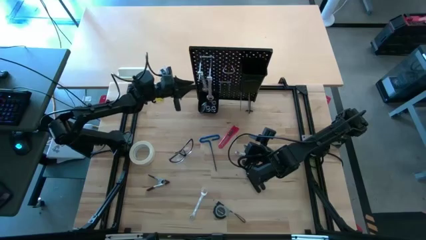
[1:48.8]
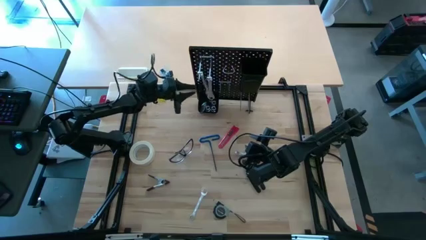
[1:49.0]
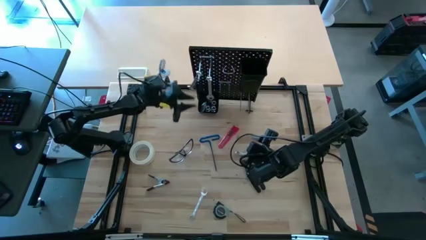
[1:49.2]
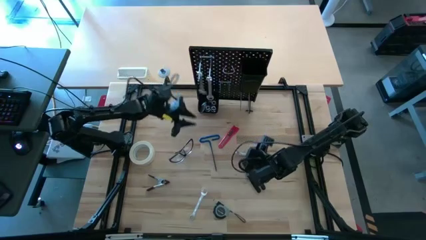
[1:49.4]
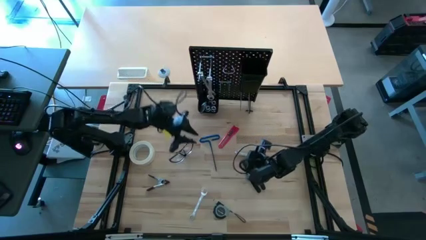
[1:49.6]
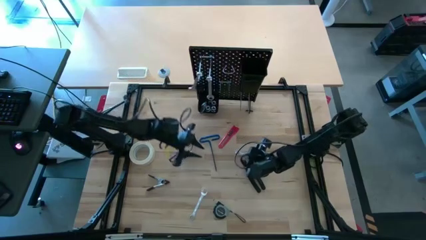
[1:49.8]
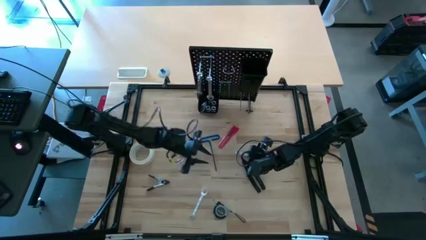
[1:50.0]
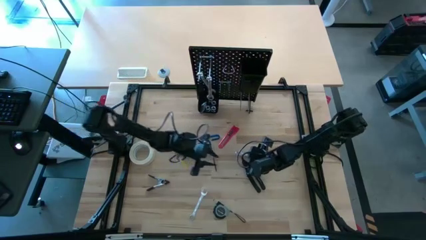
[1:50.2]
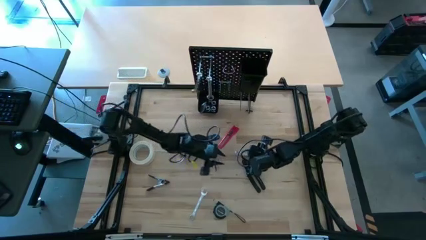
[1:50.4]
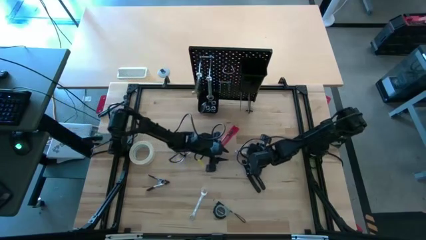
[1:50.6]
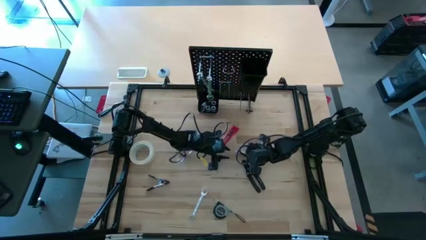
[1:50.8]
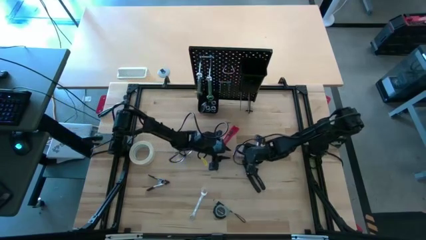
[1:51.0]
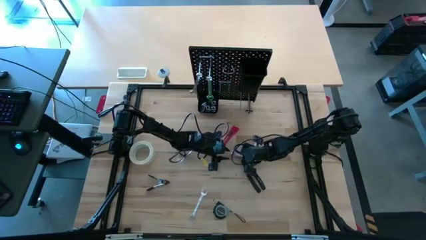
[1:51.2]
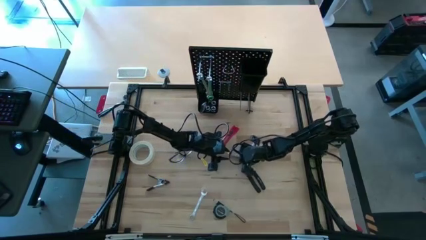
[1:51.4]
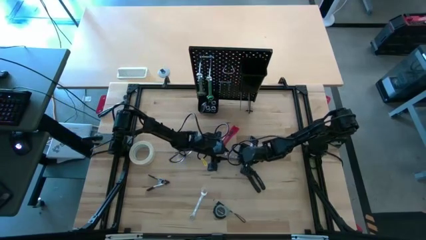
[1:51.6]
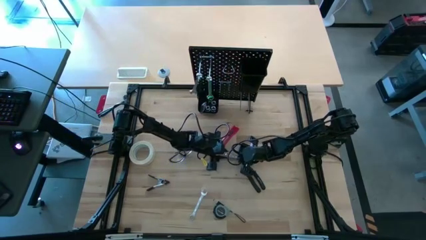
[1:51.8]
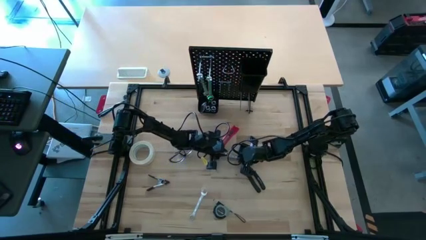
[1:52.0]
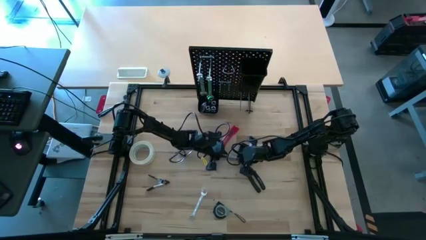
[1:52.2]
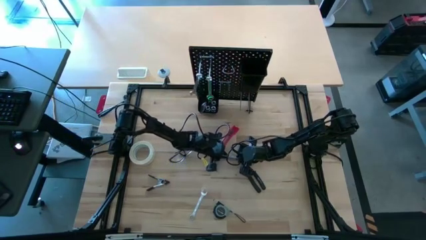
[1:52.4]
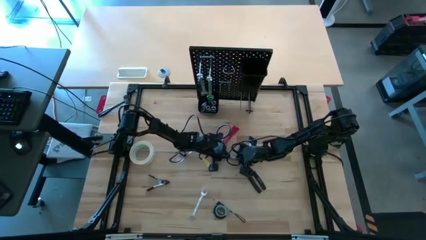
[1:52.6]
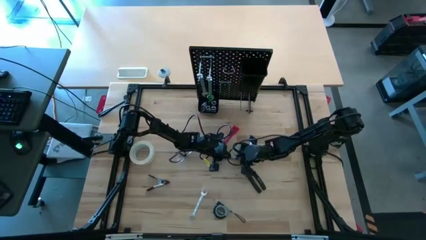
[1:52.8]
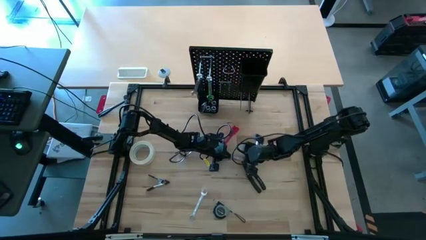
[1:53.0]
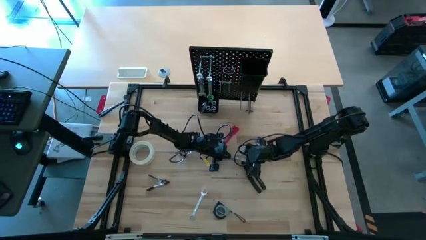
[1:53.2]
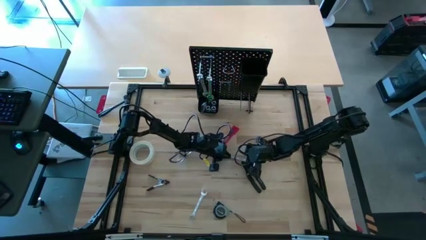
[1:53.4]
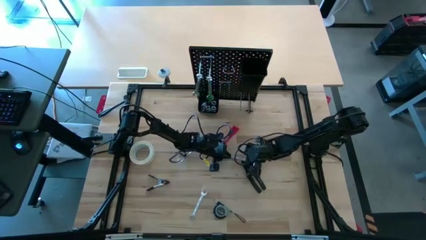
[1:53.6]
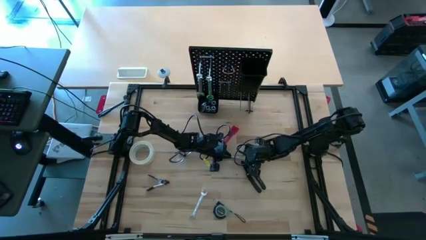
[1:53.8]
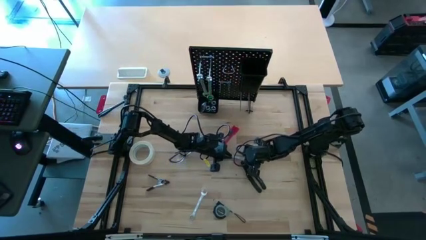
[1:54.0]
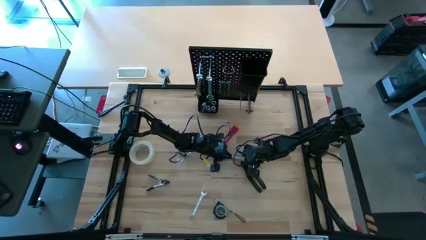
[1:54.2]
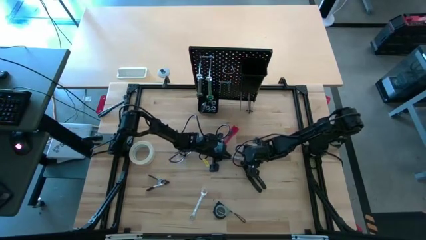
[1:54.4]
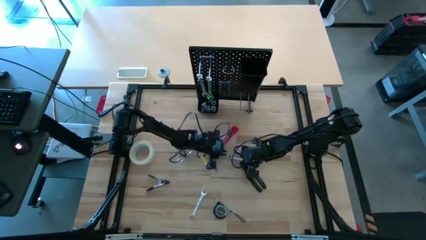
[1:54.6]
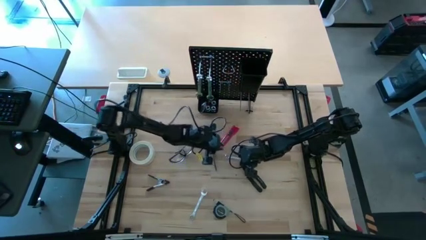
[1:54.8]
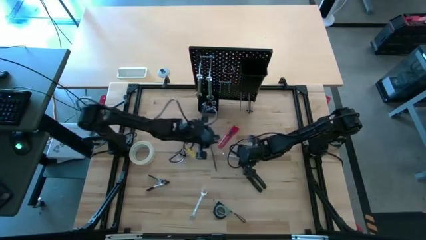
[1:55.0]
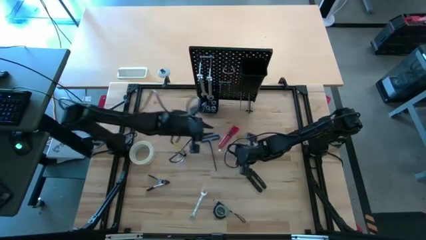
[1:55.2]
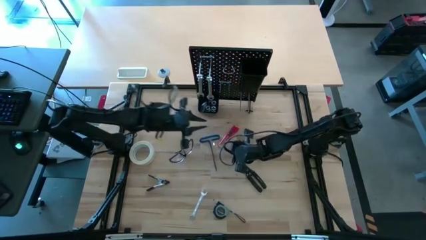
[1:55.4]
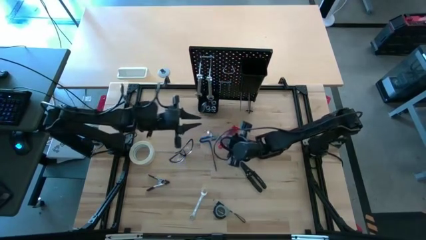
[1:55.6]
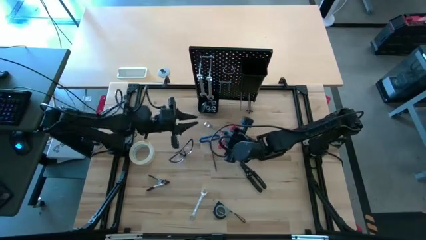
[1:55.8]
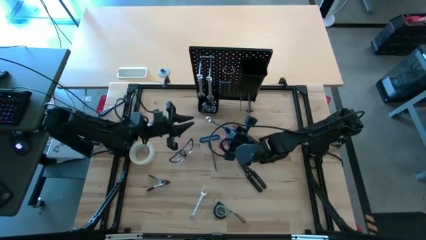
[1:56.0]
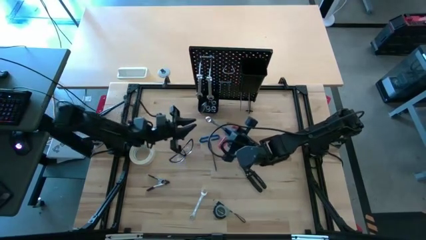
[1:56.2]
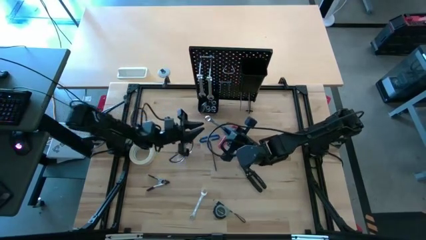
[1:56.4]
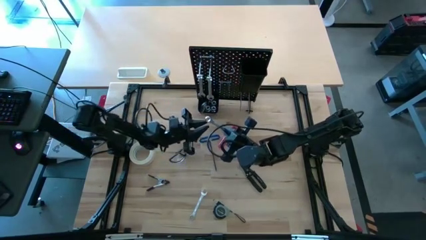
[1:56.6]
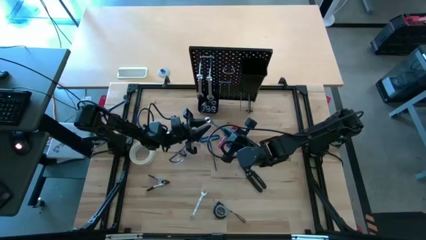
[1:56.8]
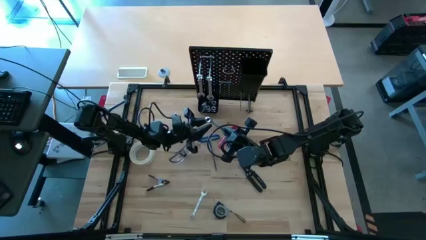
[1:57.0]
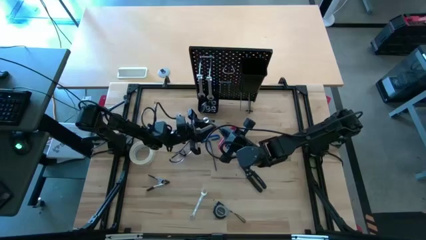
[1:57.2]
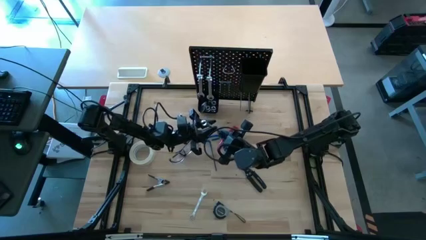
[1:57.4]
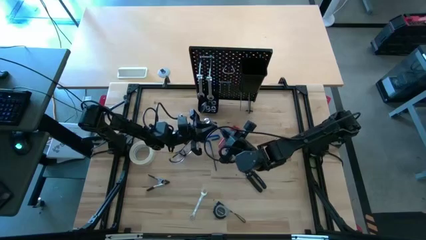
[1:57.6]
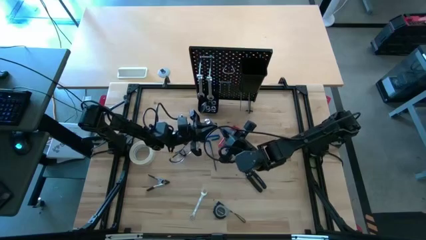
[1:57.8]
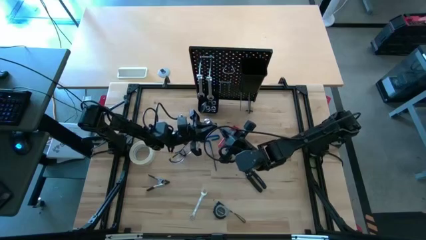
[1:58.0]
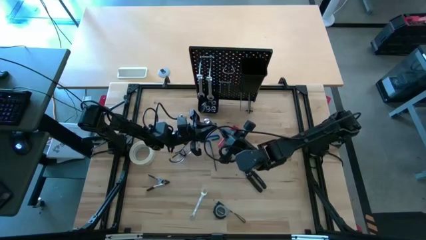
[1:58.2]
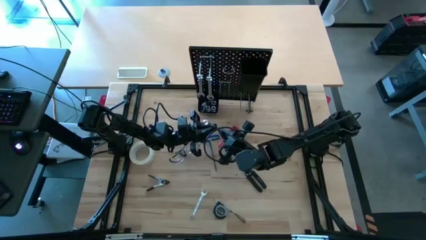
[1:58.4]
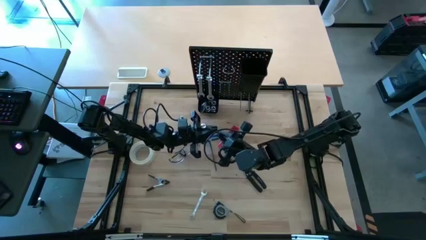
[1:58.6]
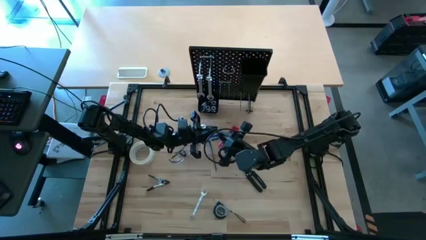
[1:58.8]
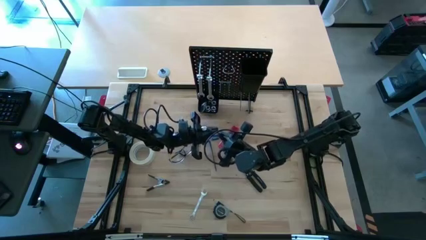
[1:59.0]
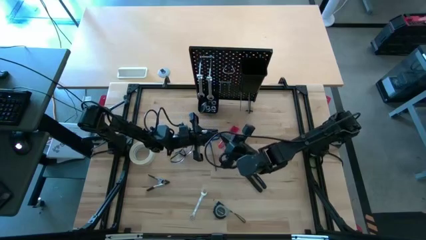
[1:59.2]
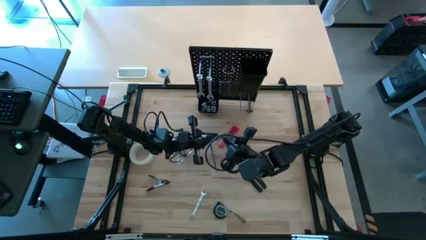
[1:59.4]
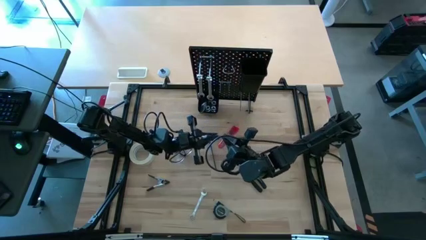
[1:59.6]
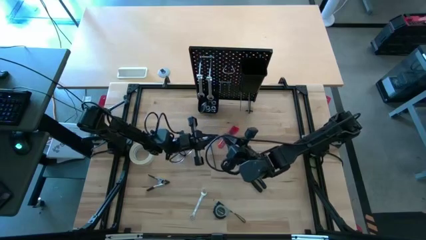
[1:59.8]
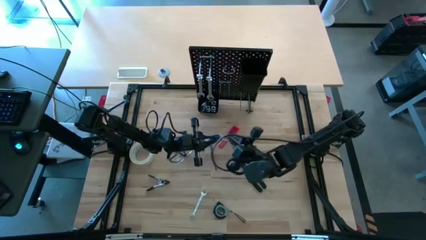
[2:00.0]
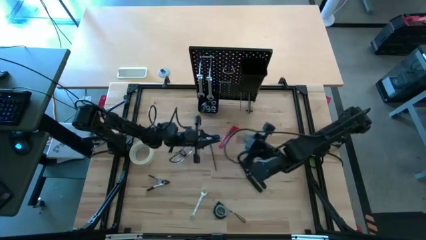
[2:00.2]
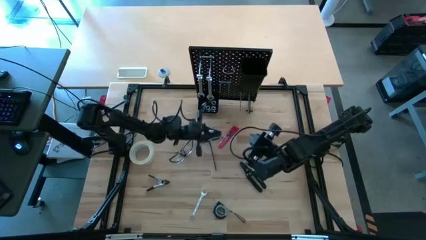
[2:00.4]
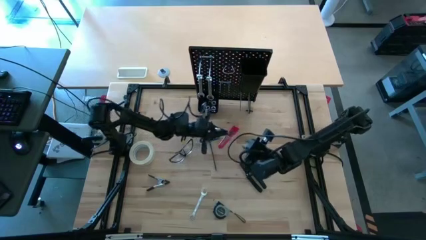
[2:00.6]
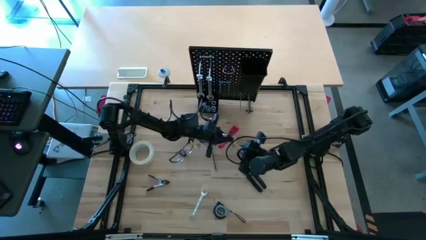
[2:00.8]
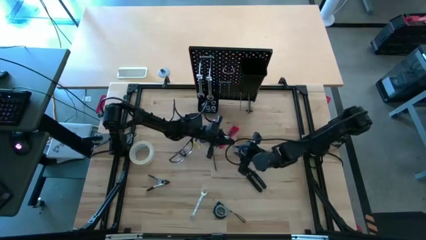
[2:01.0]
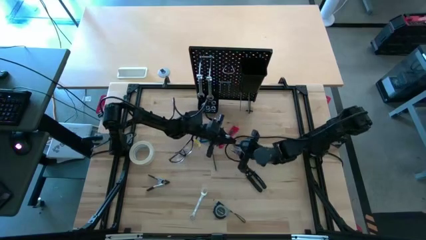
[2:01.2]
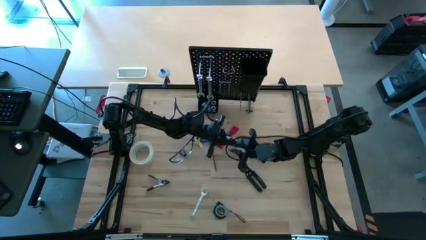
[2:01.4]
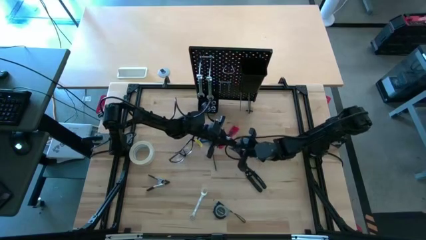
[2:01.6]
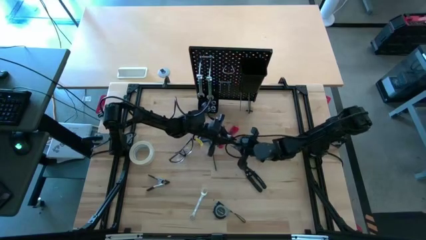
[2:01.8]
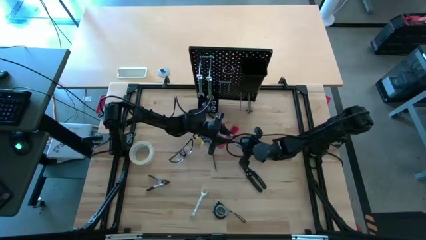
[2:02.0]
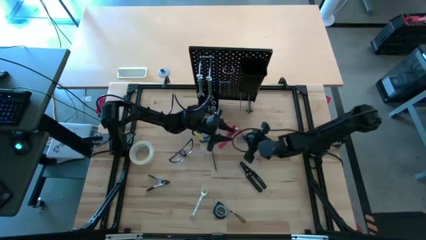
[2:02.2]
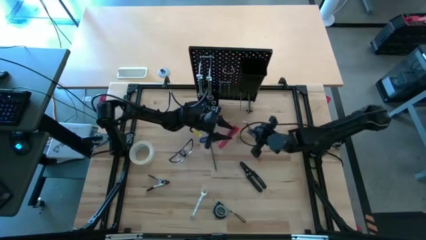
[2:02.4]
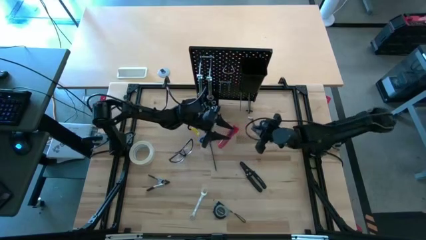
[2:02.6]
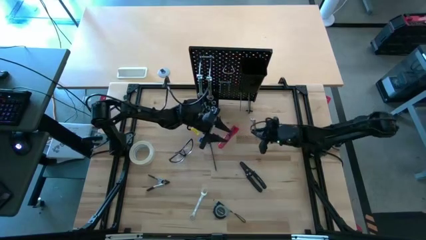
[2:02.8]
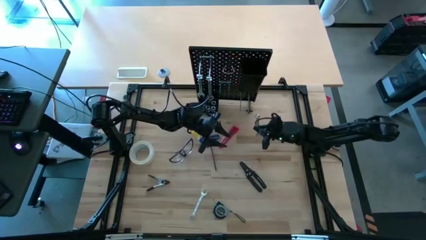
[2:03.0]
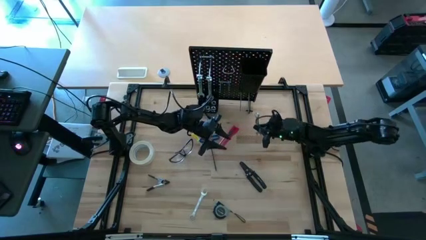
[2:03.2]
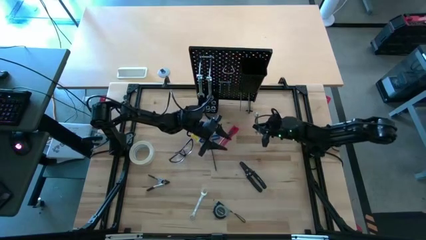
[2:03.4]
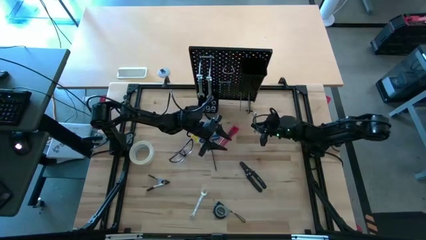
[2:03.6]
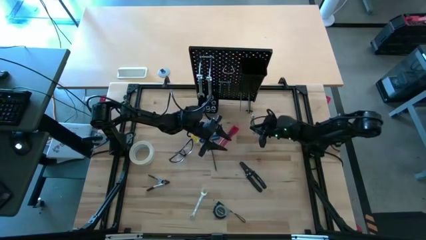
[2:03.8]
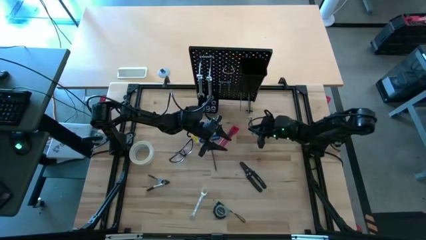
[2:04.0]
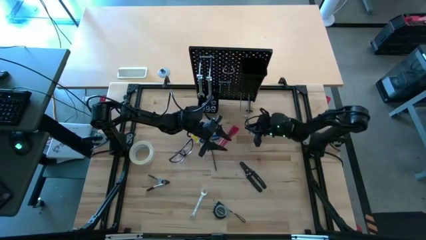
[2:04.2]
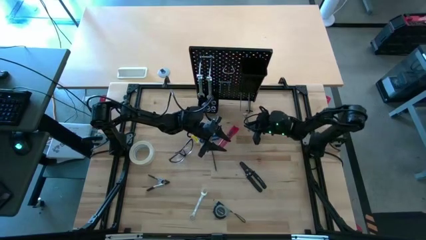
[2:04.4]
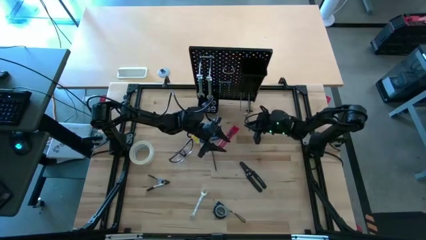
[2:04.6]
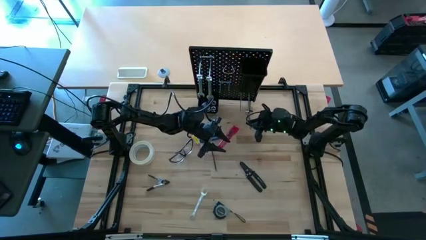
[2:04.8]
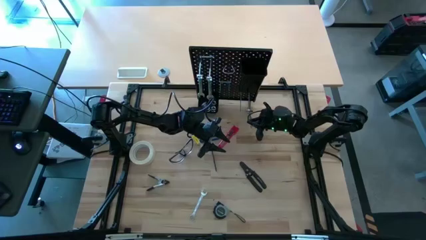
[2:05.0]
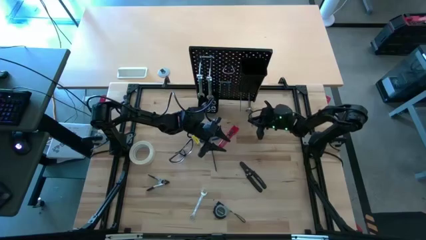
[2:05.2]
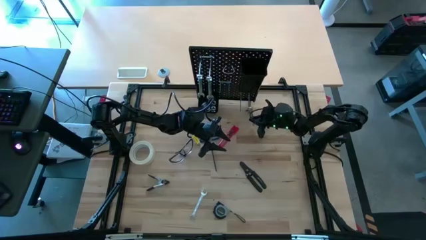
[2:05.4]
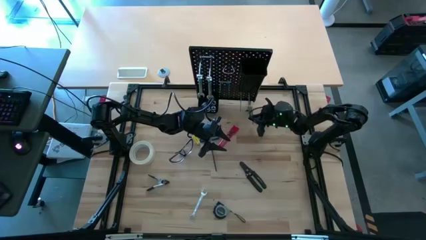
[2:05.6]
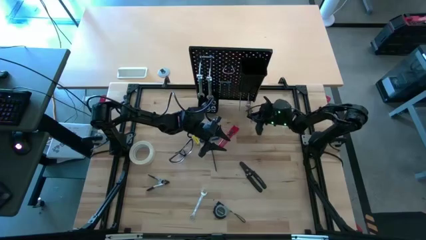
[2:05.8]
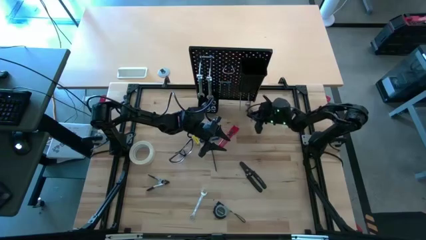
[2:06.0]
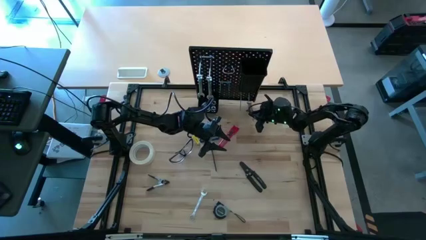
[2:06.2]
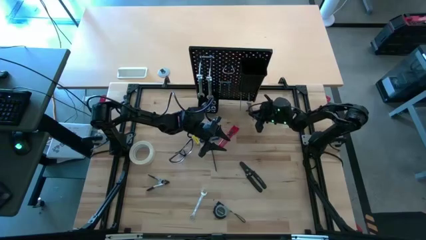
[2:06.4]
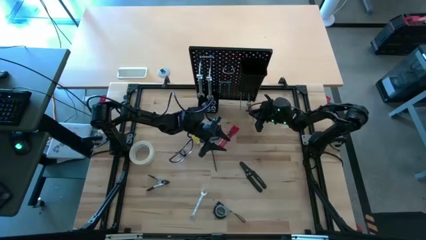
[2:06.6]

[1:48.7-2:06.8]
Task: Hang tools onto peg board
Hang the top wrench onto the peg board
